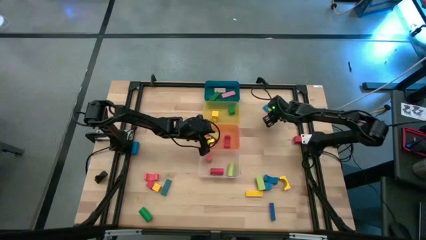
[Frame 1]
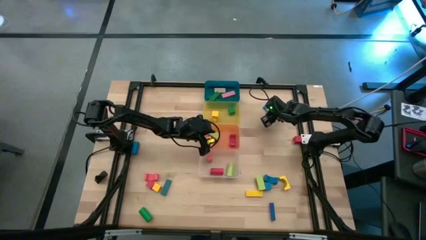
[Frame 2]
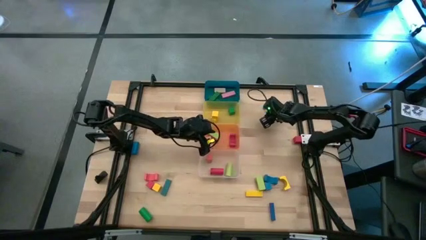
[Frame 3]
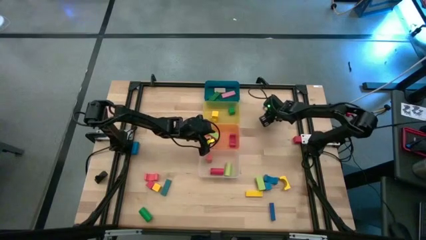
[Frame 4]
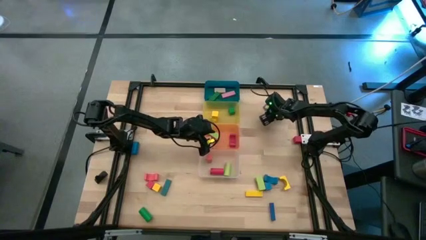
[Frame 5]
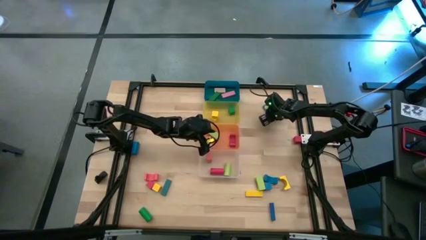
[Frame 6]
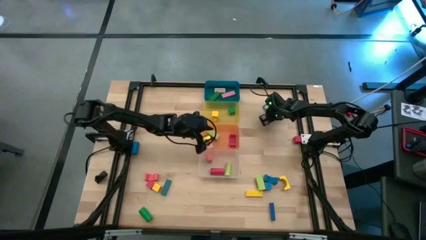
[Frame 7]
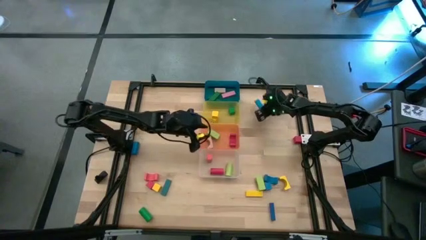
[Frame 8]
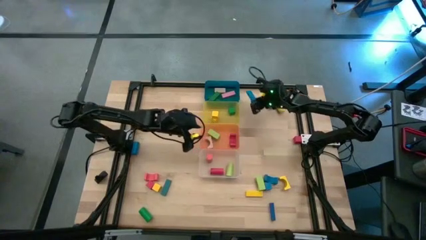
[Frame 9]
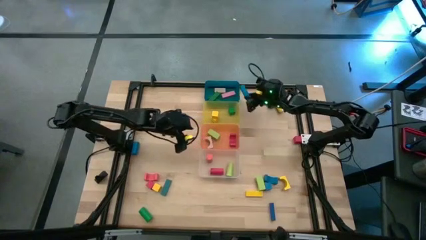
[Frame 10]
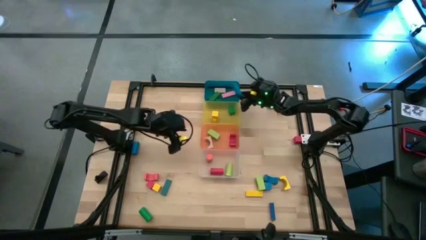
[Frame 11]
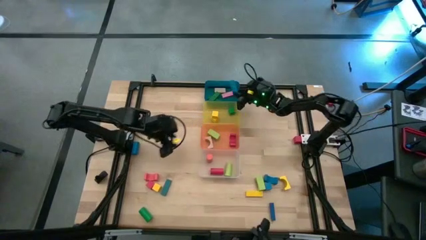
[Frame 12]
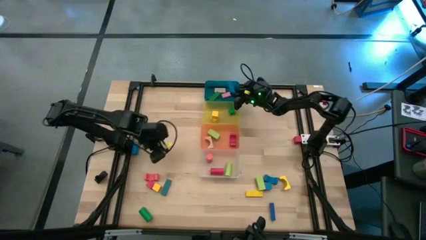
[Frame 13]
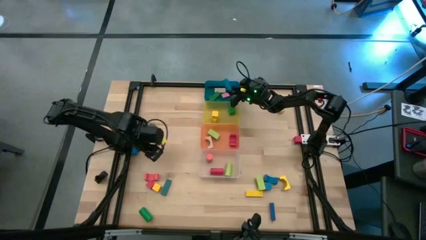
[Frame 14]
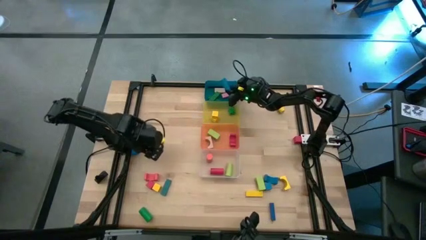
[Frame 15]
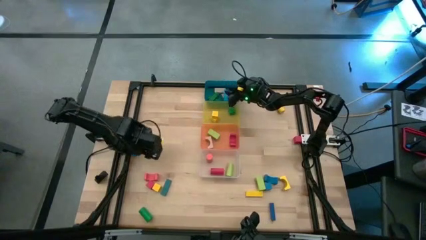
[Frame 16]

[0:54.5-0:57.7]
Task: Sort blocks by size
Put the blue rectangular block into the blue bin

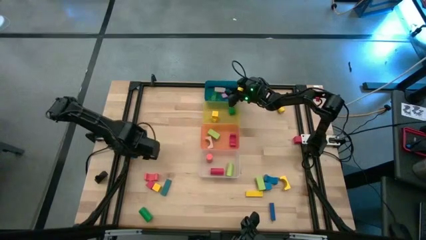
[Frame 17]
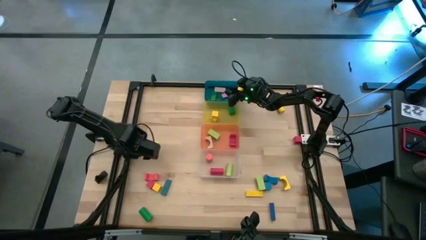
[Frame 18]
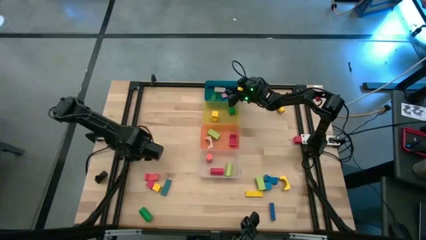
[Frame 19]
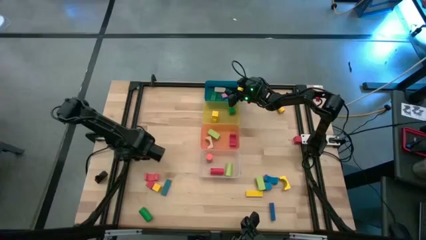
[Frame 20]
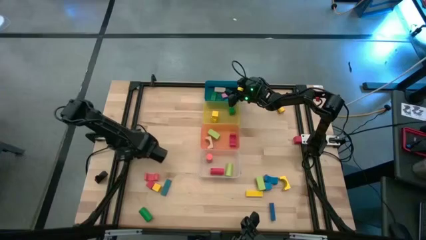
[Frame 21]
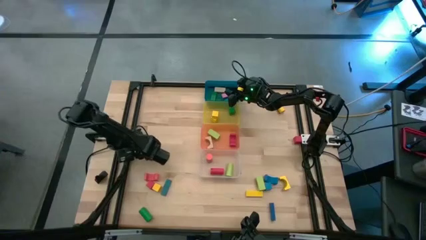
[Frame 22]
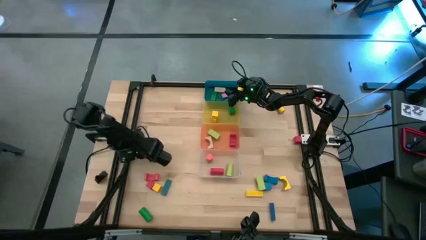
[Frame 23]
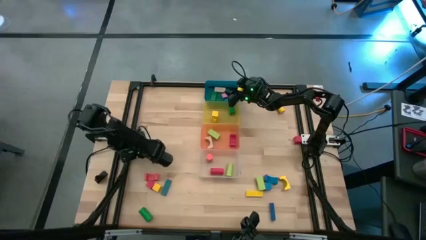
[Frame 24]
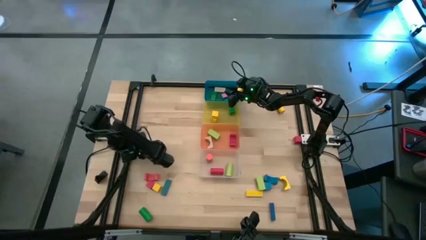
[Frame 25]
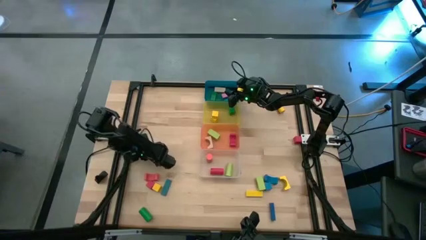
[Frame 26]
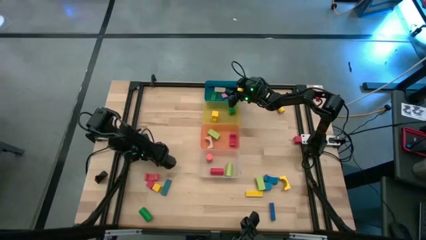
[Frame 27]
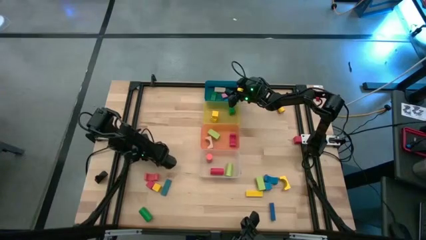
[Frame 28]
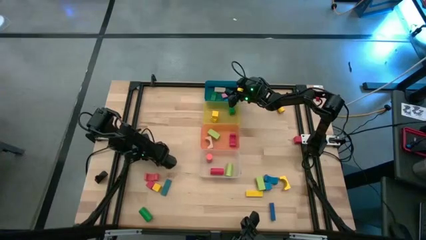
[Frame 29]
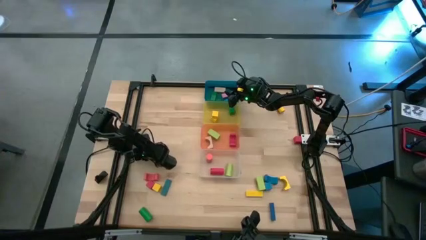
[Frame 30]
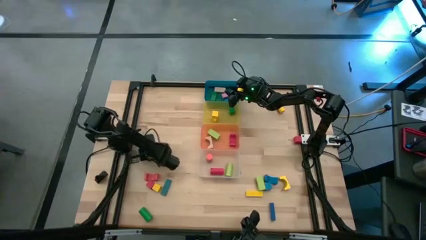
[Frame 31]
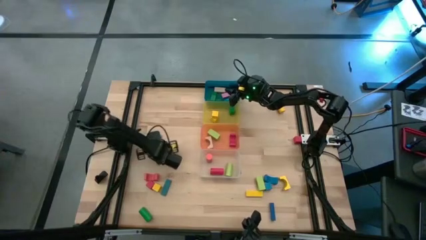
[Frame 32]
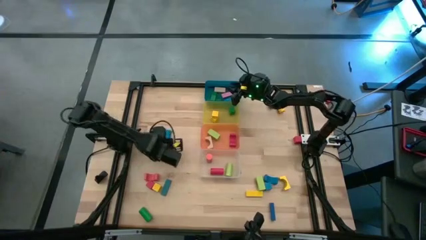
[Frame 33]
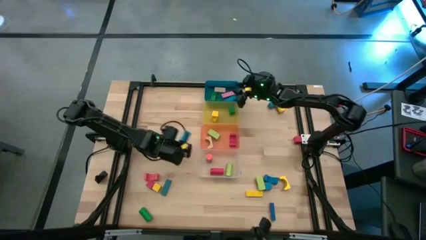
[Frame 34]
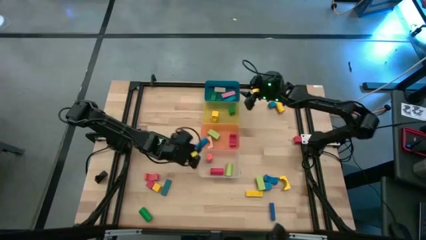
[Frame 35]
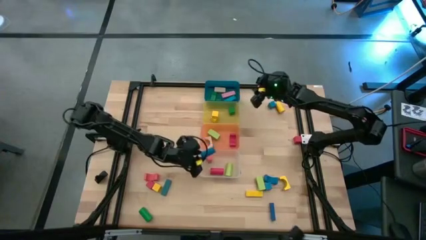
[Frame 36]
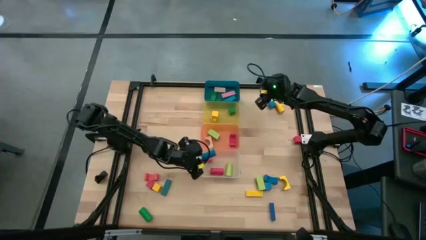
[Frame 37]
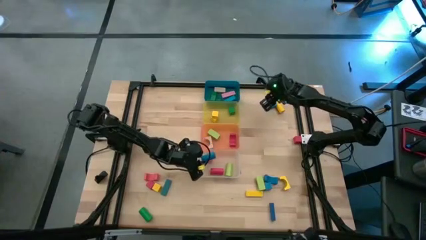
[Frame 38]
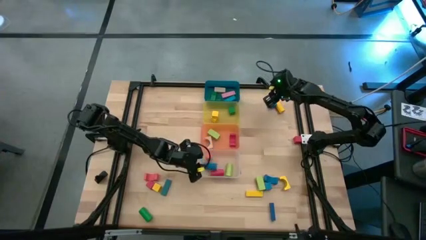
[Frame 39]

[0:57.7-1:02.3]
Put the blue cylindrical block into the transparent bin

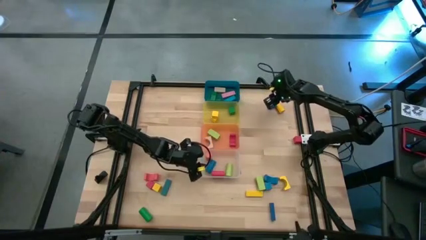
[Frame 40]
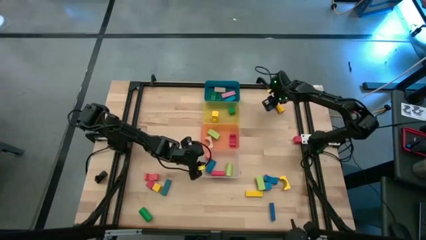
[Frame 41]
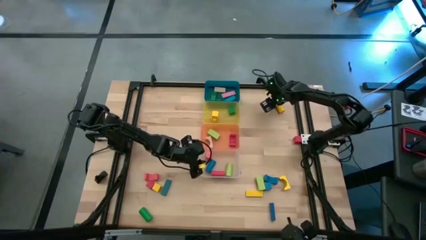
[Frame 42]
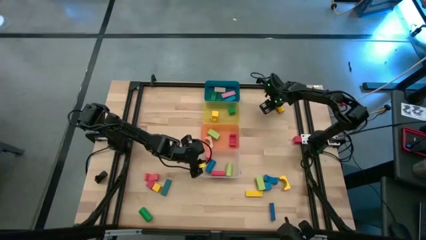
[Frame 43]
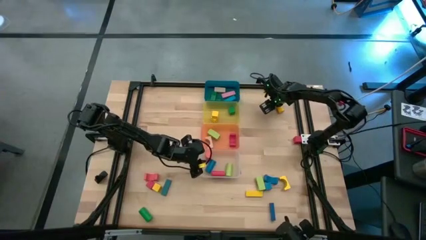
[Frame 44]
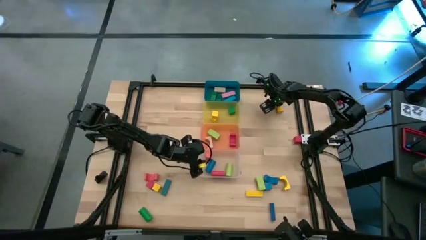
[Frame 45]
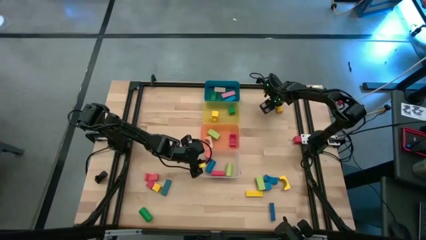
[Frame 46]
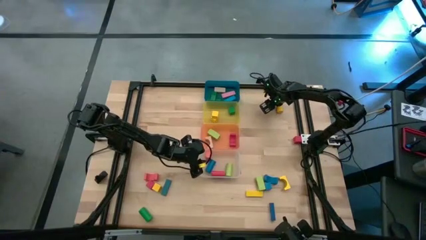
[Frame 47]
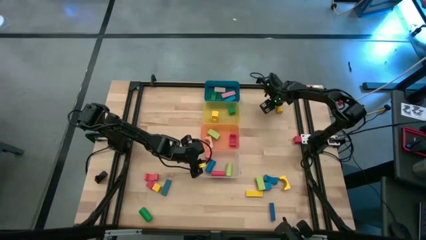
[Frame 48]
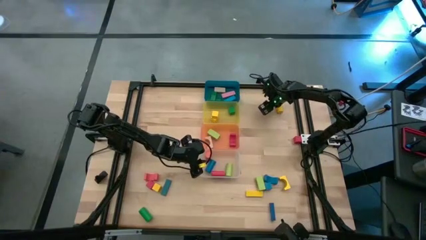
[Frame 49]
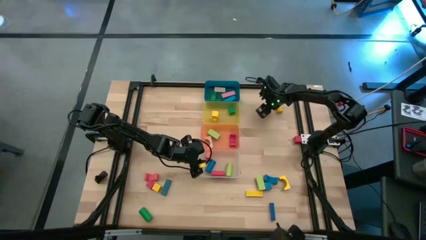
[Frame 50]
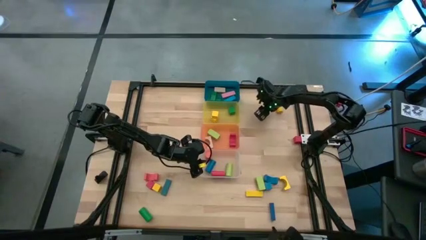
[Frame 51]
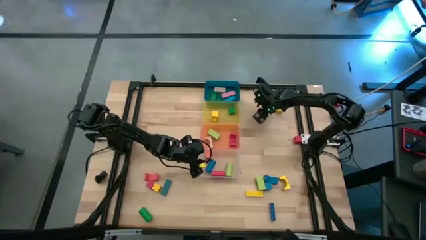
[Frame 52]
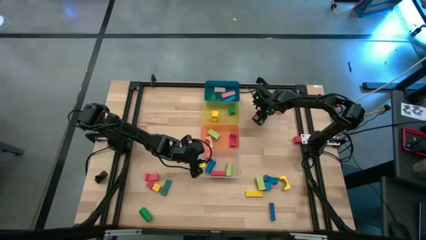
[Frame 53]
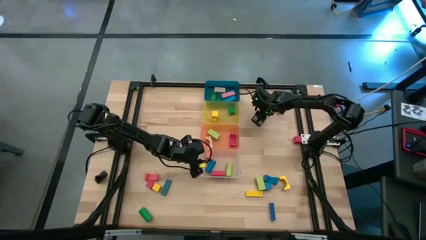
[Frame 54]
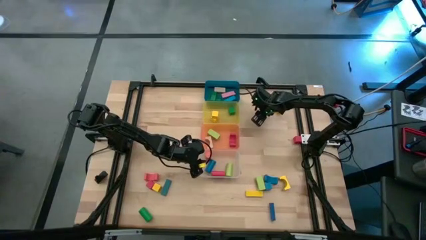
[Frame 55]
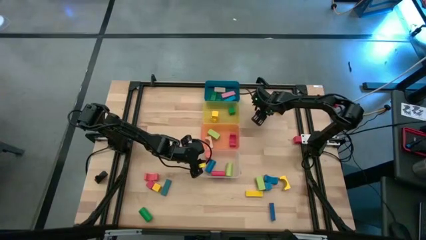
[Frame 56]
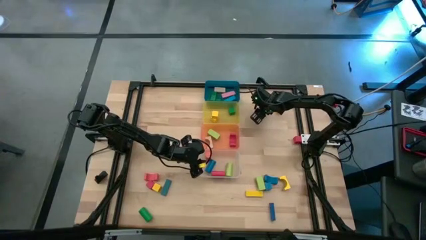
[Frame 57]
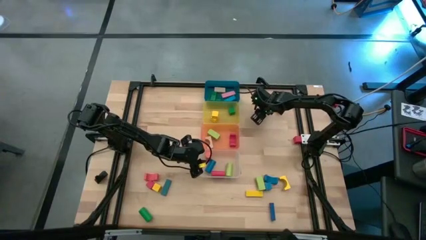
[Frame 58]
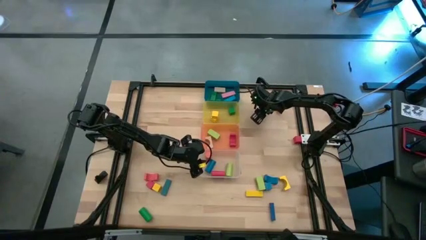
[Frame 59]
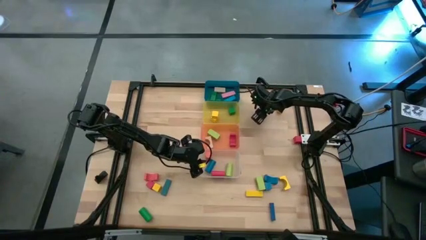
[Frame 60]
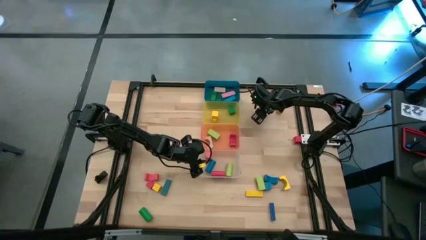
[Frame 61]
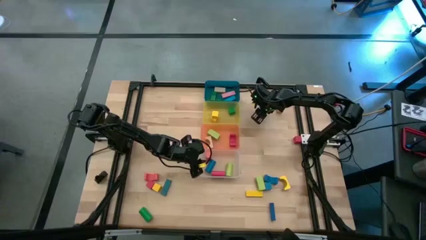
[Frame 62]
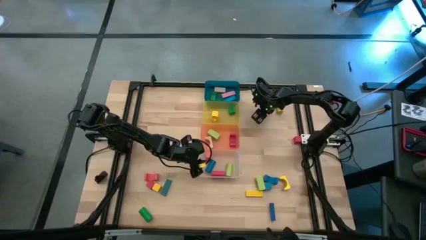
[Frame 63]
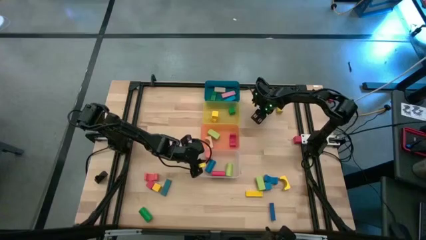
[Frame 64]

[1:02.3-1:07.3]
Put the blue square block into the yellow bin

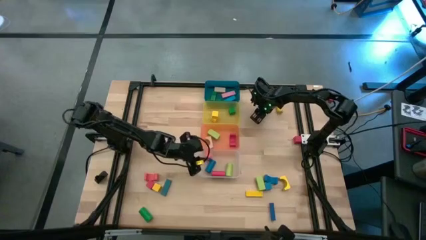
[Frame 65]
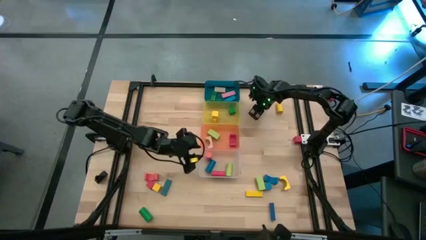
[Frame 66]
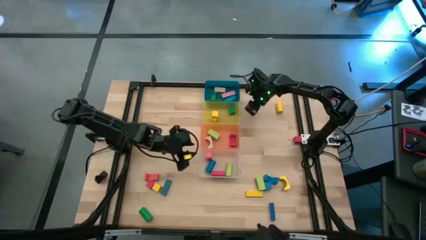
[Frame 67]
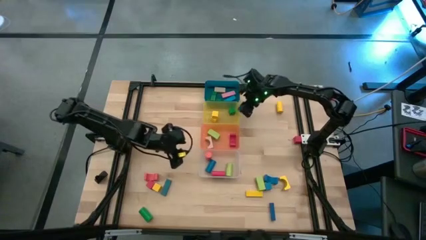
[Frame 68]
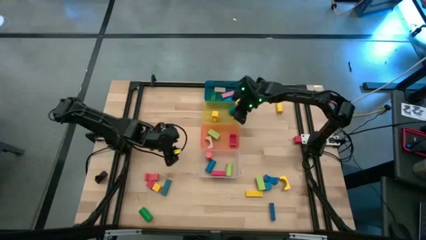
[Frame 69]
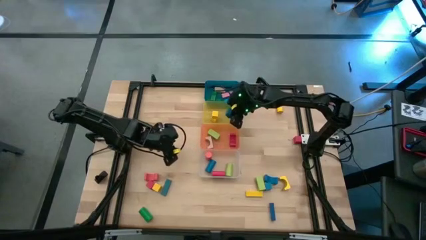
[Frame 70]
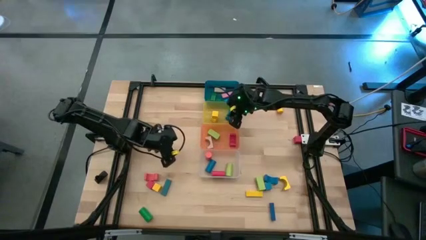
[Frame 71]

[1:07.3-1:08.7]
Put the blue square block into the yellow bin

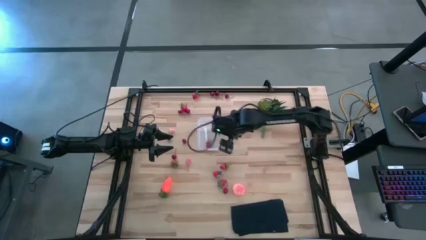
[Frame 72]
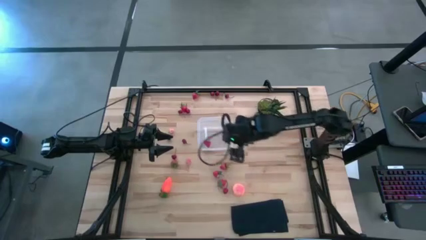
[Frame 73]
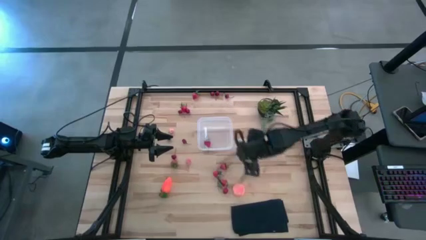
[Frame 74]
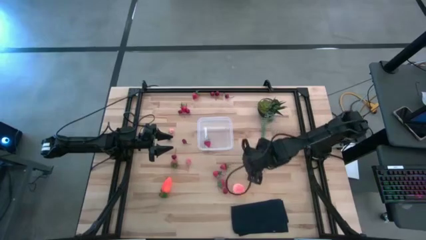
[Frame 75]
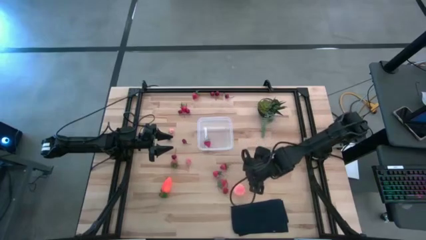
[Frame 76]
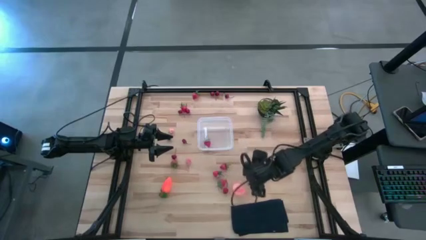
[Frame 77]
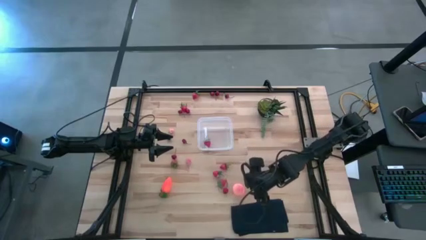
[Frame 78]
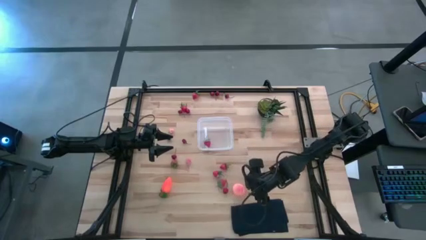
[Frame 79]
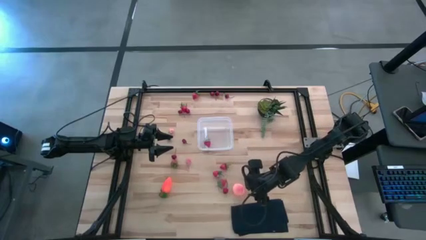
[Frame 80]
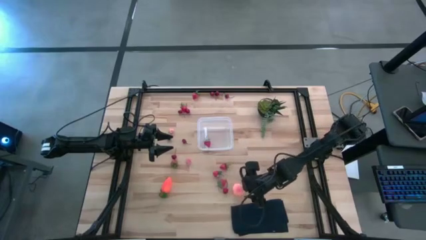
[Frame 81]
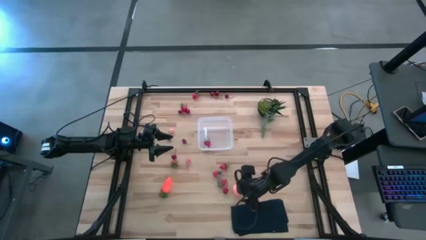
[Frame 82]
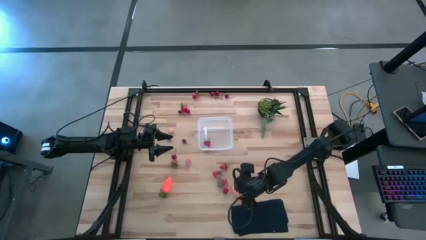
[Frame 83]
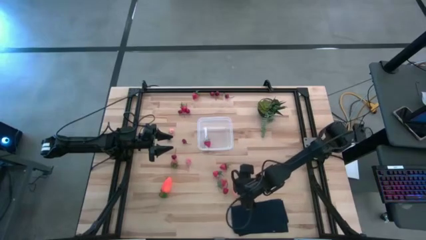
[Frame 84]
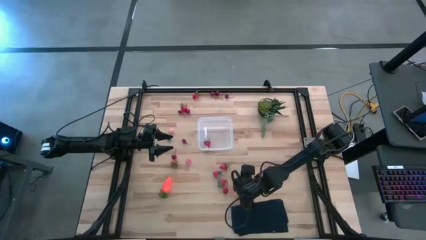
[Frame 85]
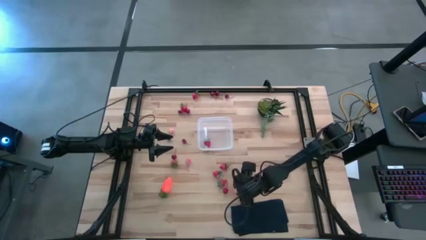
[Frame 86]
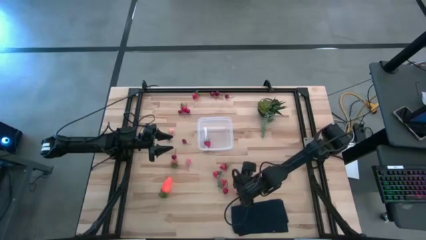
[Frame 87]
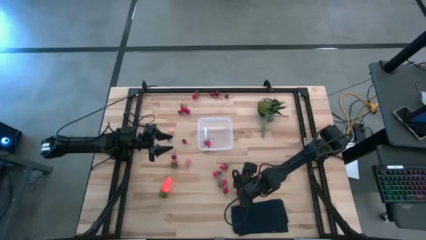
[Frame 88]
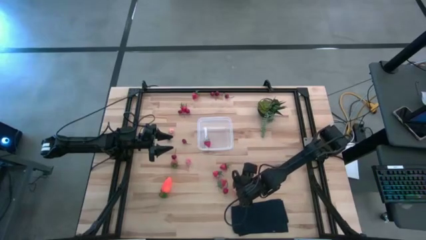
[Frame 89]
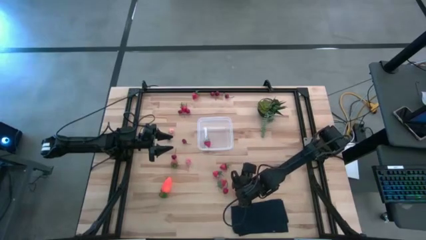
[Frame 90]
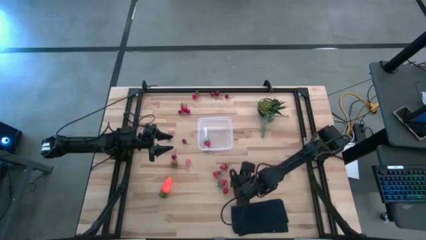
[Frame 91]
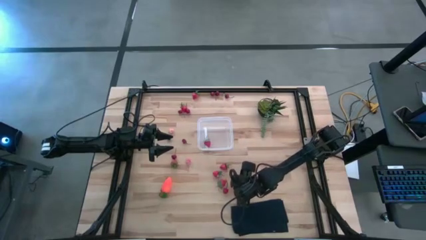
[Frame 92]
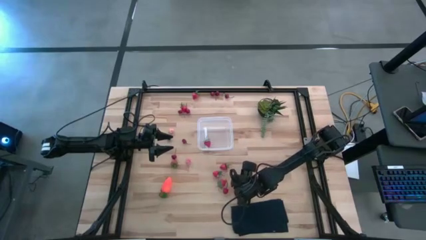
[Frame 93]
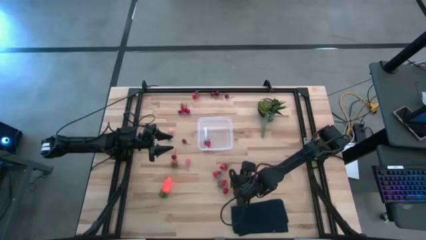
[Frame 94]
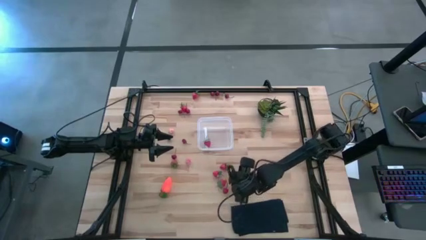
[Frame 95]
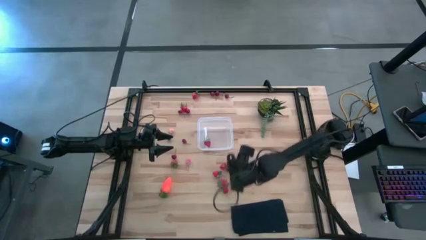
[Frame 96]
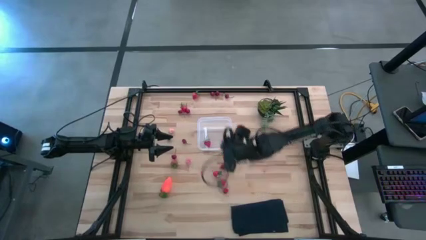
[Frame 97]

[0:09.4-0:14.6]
Task: Pick and placing Produce into tupperware
Put the peach into the transparent bin
